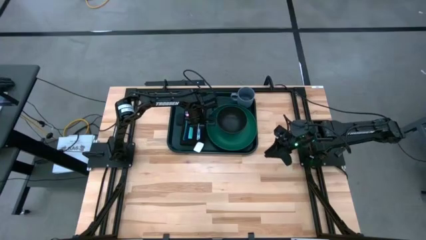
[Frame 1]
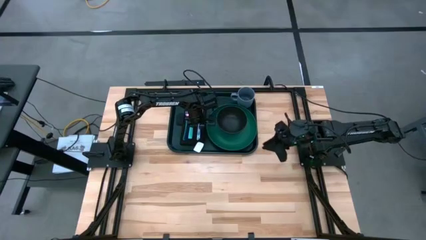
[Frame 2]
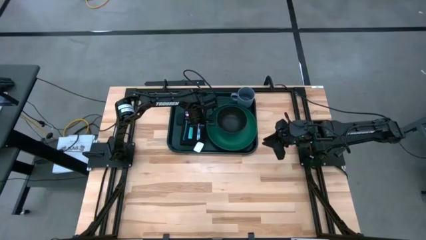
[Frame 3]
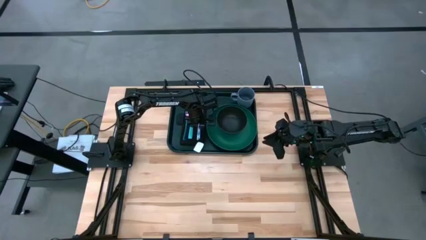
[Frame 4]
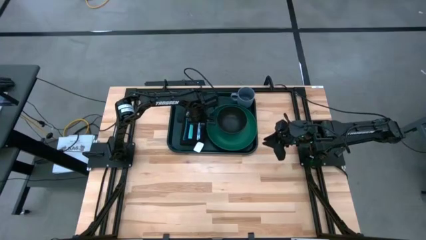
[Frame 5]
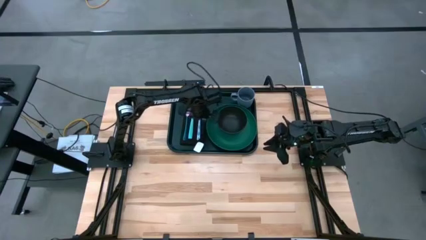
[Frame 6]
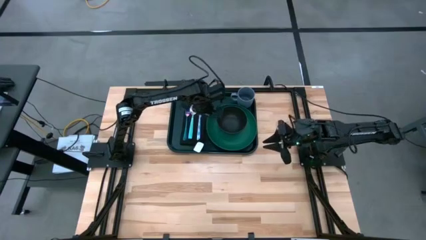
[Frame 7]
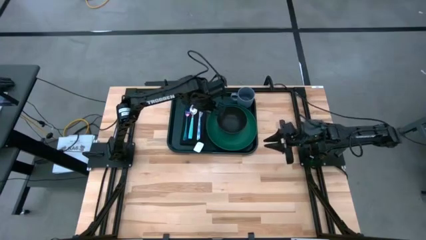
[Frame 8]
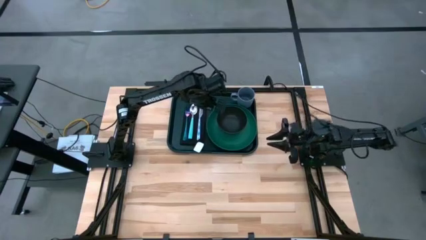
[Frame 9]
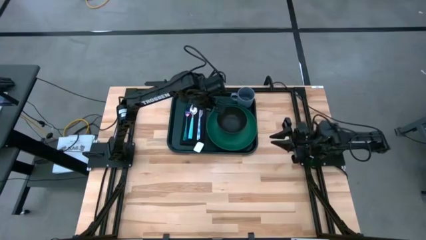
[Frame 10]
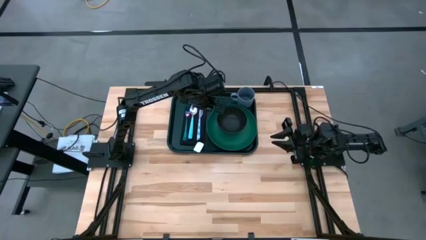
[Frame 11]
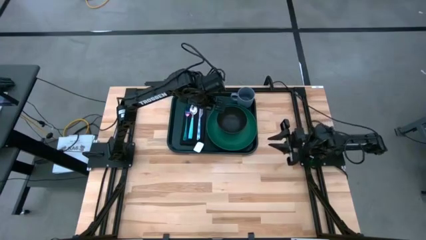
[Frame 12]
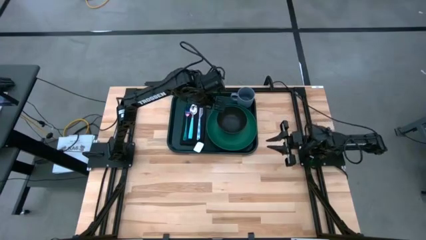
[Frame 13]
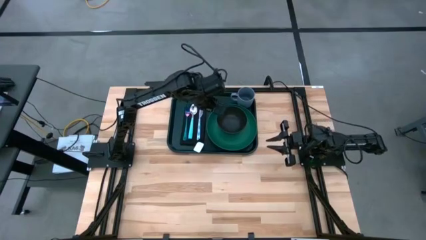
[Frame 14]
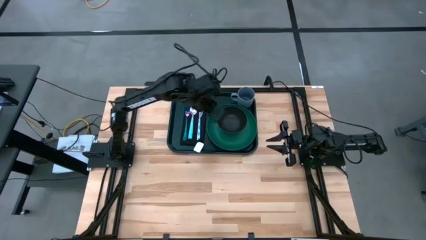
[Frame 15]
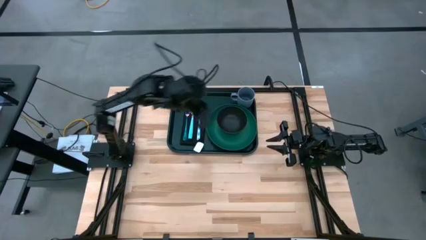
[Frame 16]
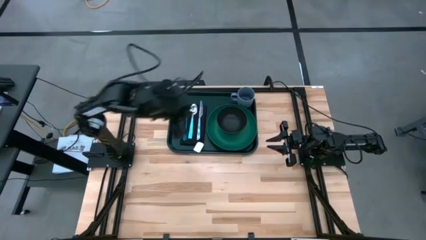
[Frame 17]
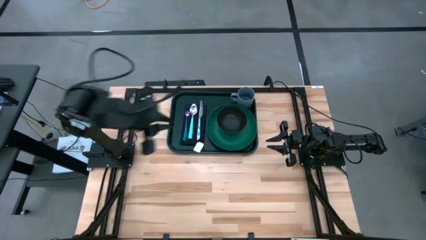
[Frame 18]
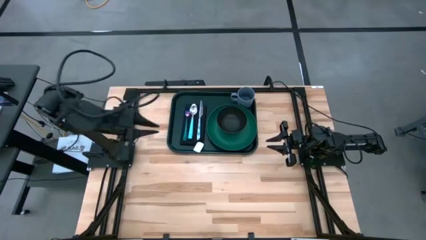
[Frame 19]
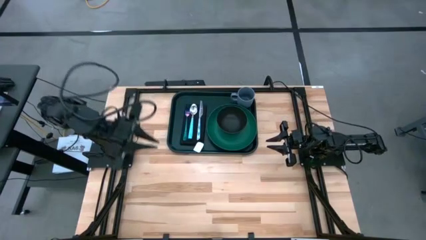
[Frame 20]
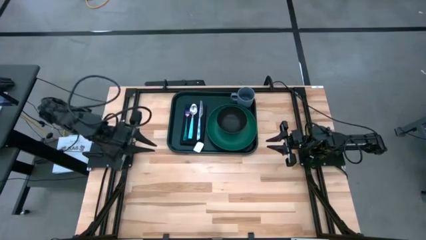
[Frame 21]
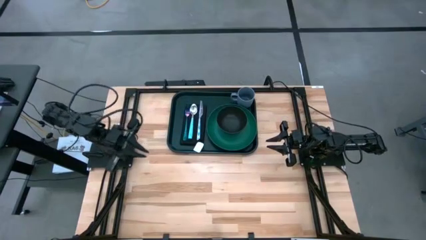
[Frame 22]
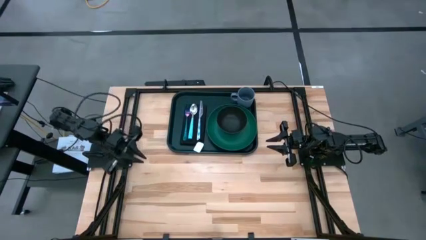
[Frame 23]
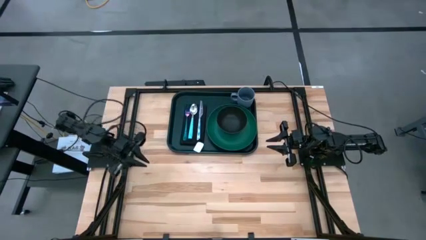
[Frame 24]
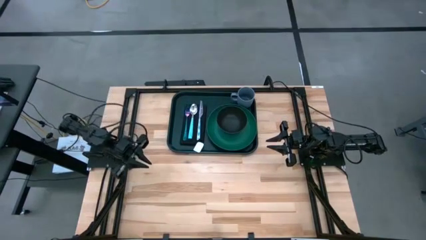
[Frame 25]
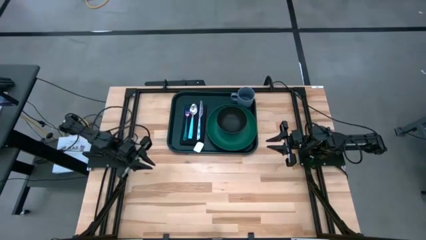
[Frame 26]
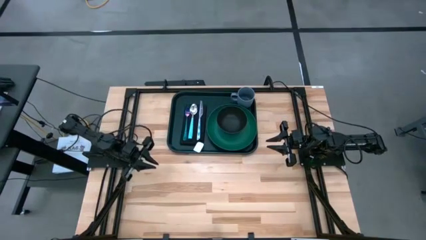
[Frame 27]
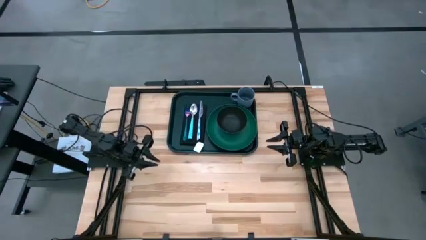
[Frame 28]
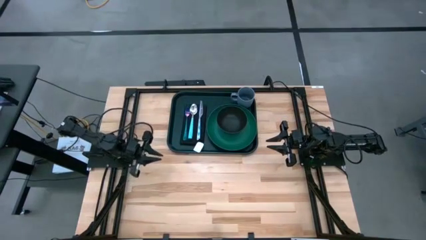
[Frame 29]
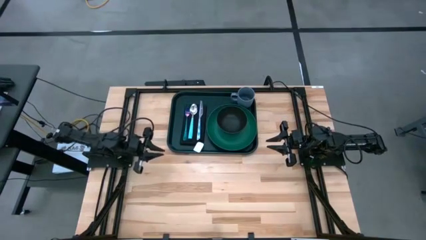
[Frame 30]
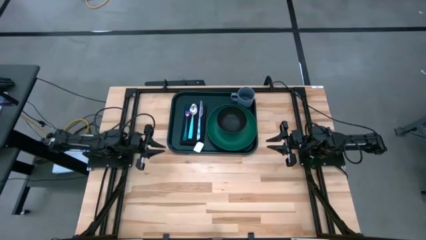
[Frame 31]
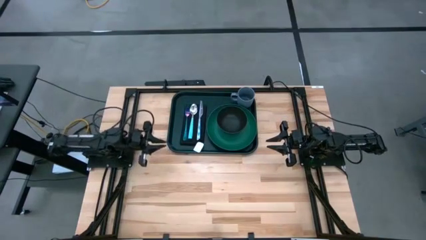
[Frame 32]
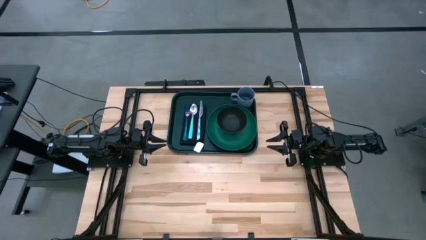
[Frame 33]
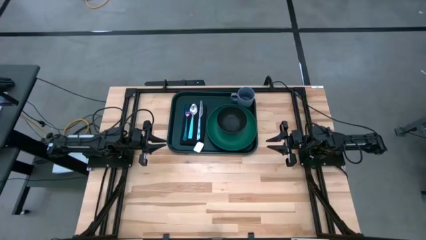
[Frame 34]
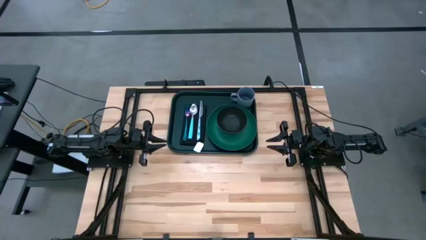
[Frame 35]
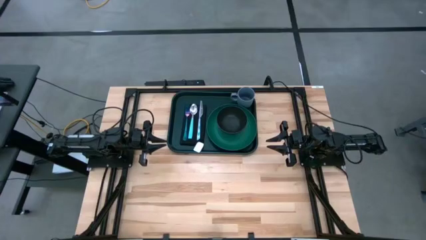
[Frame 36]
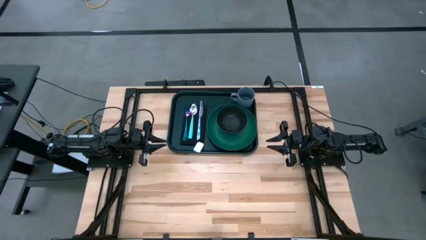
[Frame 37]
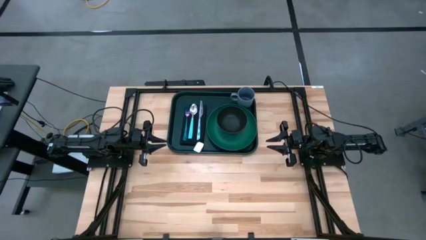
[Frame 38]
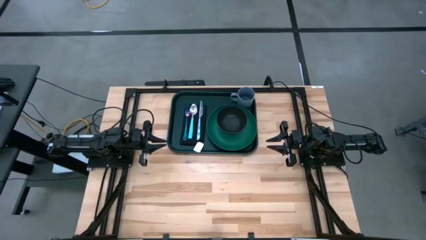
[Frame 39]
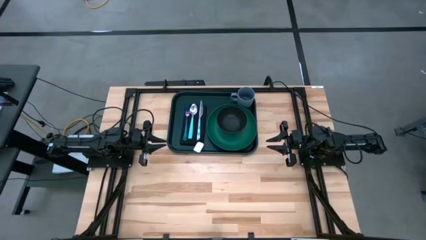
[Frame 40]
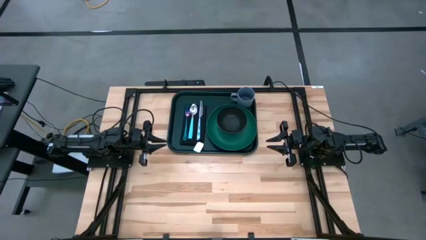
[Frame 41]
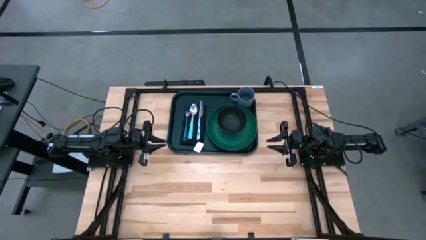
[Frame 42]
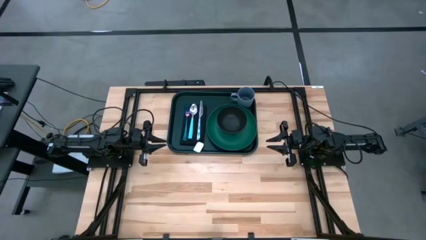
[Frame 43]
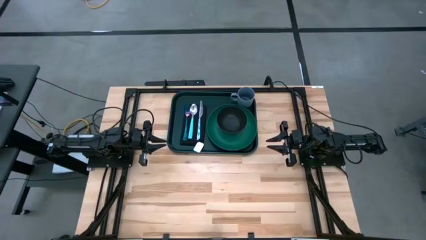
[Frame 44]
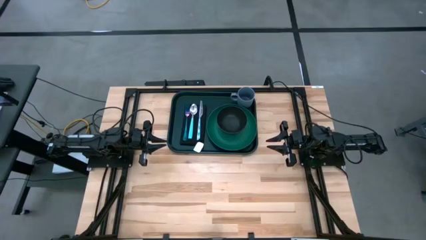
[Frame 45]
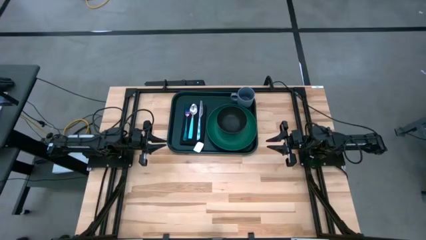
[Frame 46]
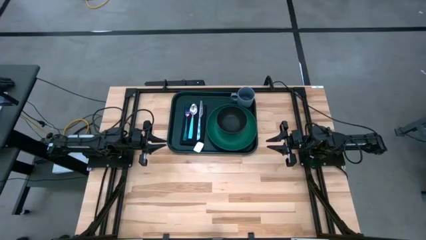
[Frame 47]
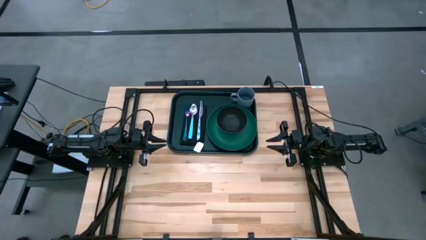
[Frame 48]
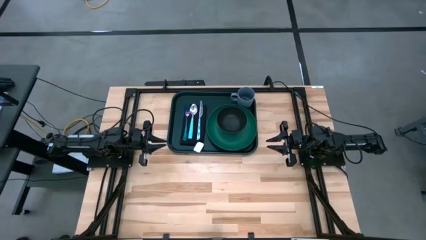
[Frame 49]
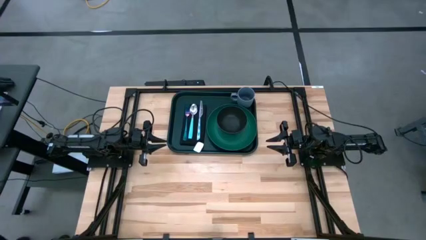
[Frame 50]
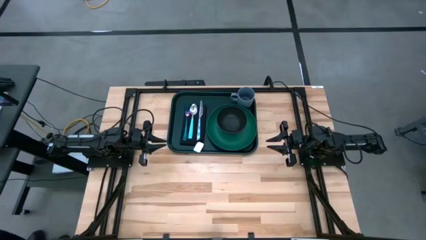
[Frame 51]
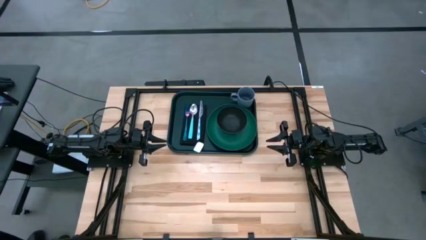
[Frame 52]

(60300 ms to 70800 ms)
Task: Set up tray
Return to Home Position
